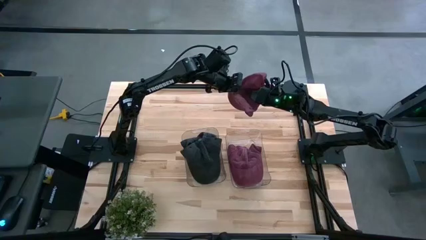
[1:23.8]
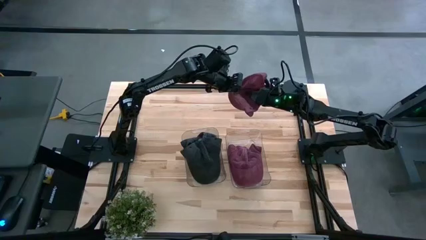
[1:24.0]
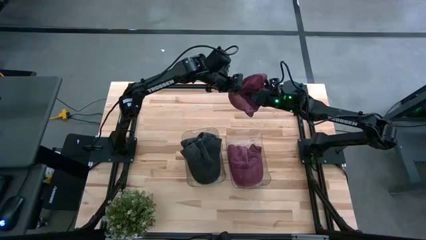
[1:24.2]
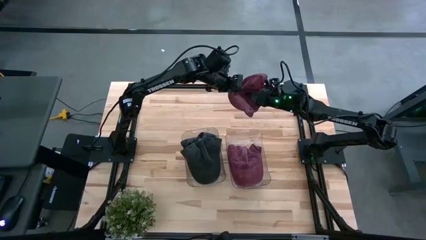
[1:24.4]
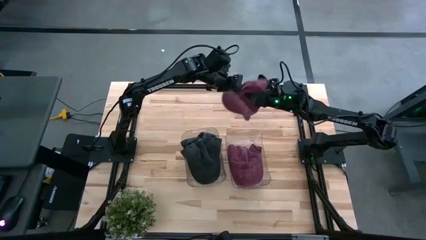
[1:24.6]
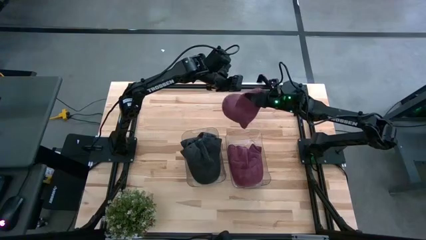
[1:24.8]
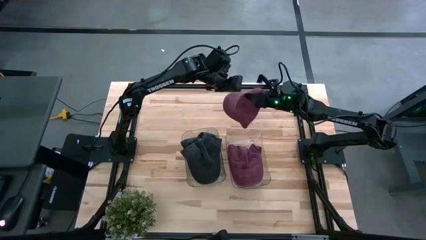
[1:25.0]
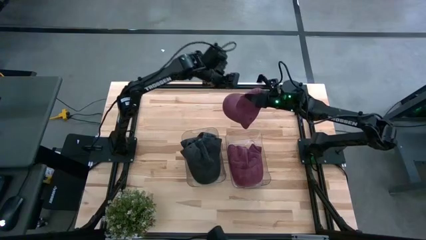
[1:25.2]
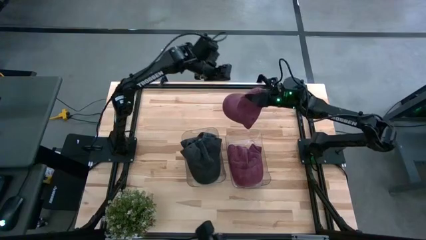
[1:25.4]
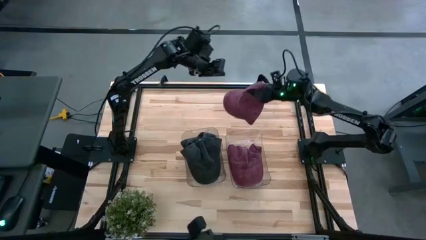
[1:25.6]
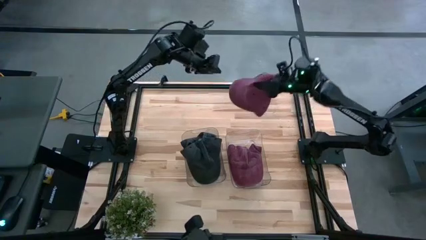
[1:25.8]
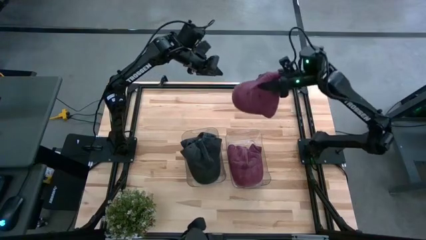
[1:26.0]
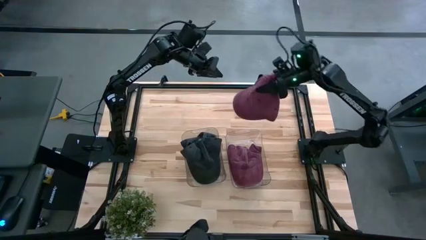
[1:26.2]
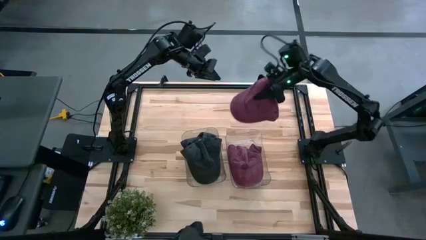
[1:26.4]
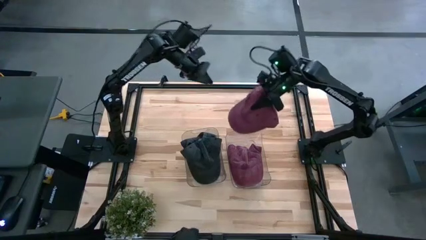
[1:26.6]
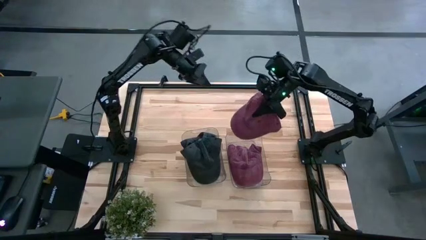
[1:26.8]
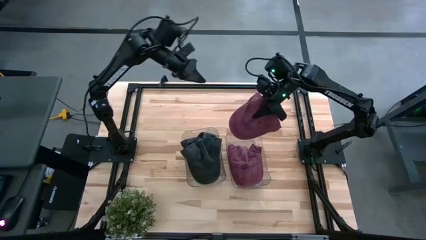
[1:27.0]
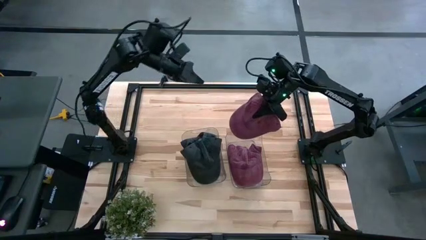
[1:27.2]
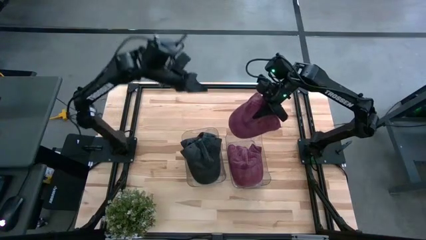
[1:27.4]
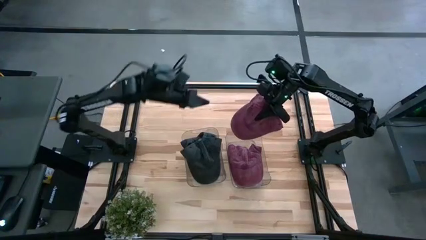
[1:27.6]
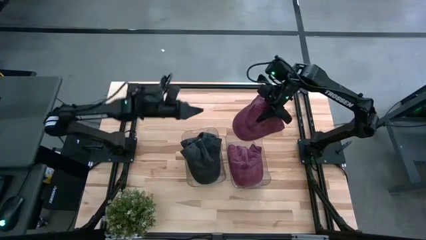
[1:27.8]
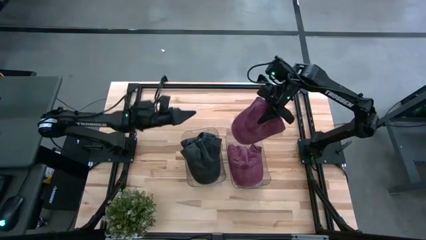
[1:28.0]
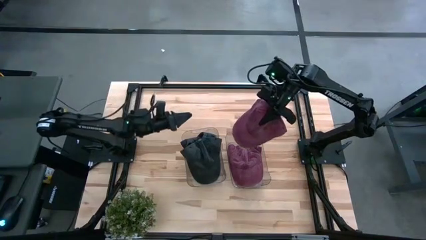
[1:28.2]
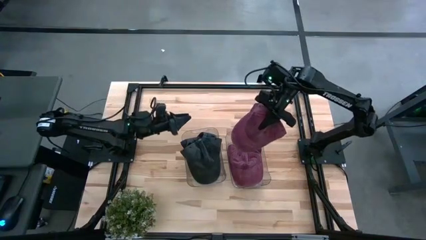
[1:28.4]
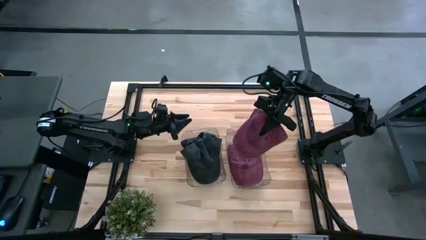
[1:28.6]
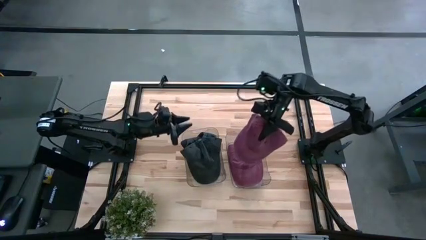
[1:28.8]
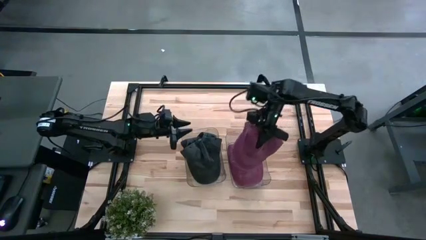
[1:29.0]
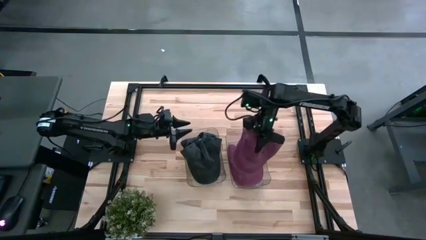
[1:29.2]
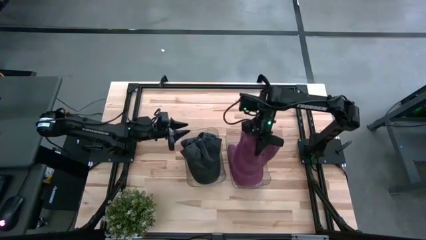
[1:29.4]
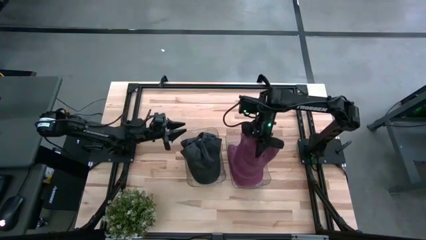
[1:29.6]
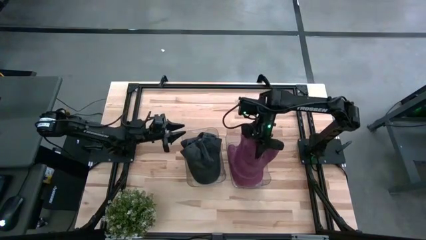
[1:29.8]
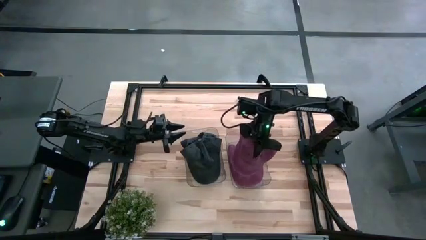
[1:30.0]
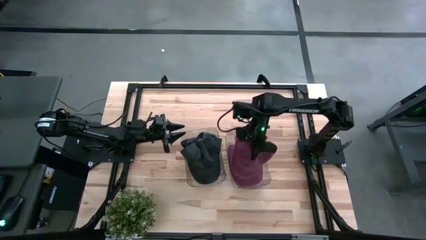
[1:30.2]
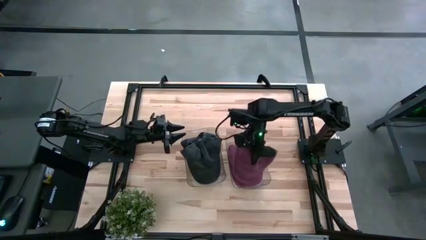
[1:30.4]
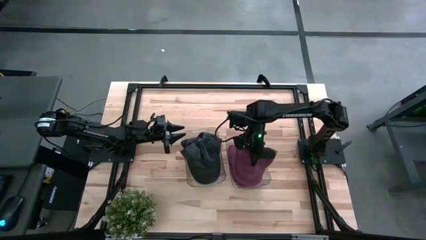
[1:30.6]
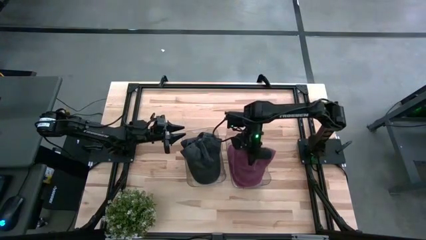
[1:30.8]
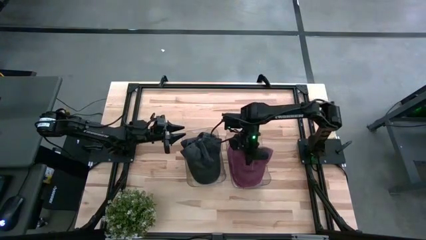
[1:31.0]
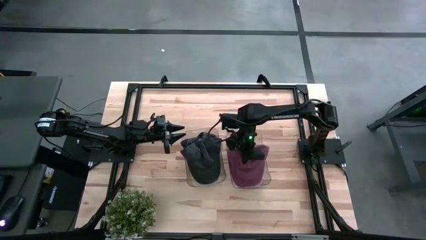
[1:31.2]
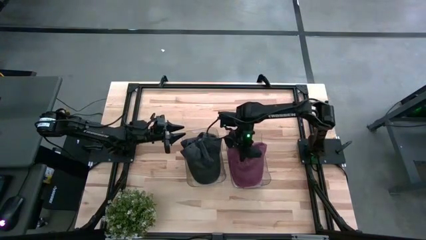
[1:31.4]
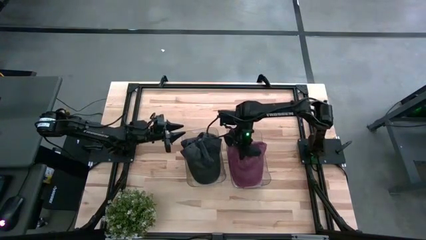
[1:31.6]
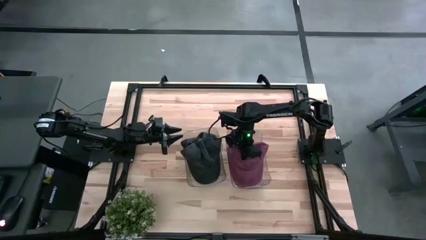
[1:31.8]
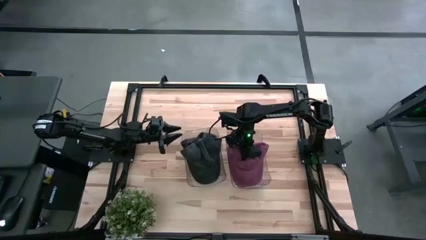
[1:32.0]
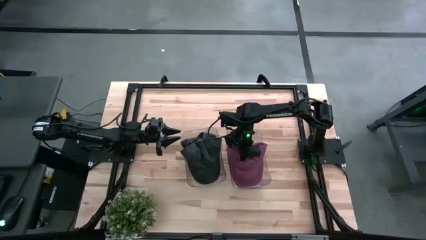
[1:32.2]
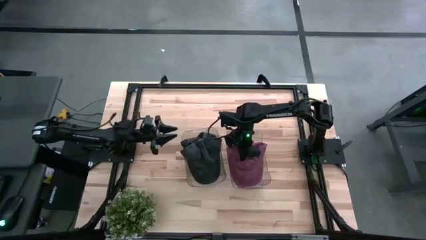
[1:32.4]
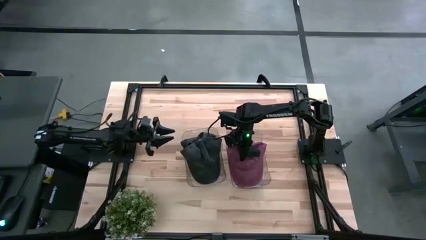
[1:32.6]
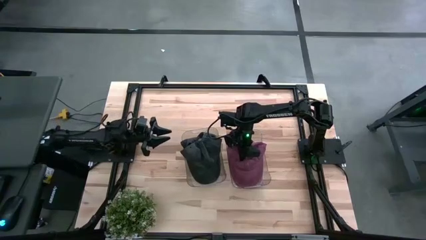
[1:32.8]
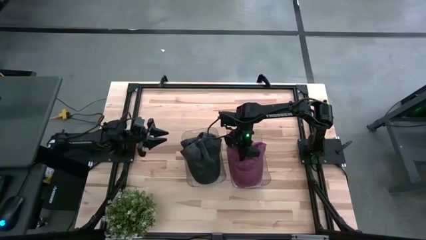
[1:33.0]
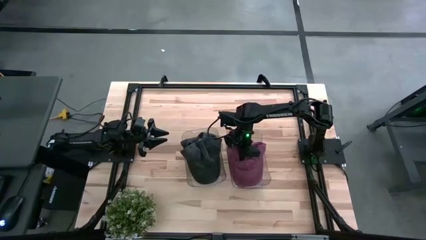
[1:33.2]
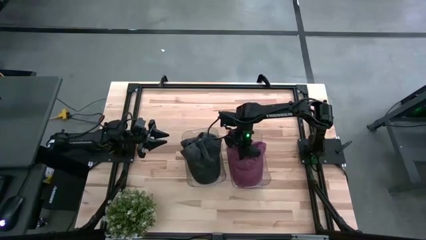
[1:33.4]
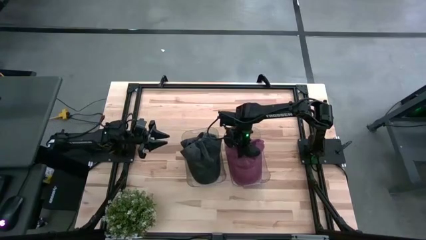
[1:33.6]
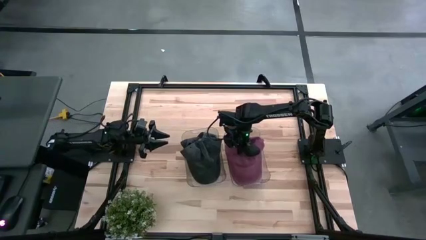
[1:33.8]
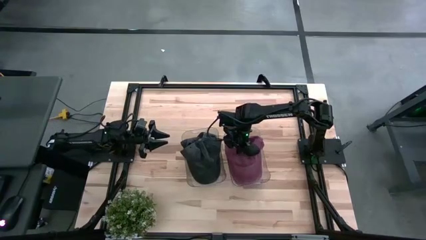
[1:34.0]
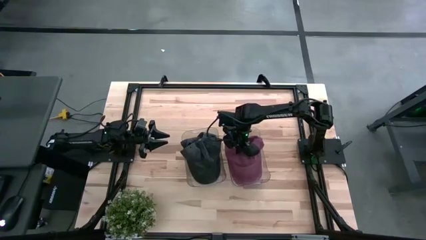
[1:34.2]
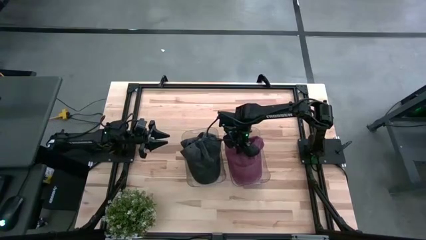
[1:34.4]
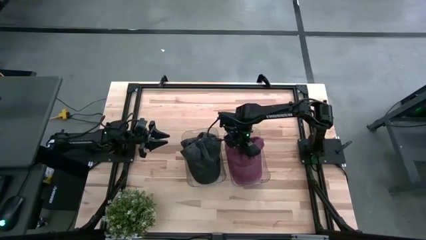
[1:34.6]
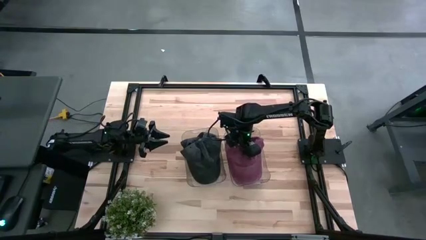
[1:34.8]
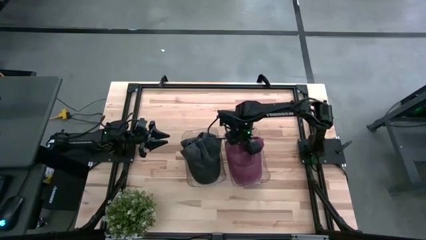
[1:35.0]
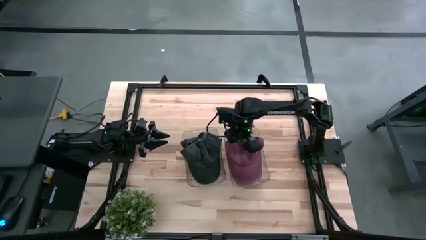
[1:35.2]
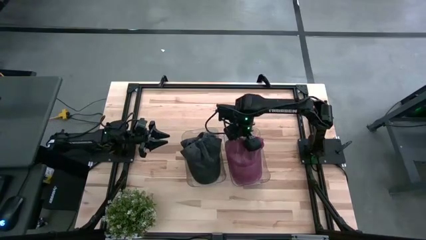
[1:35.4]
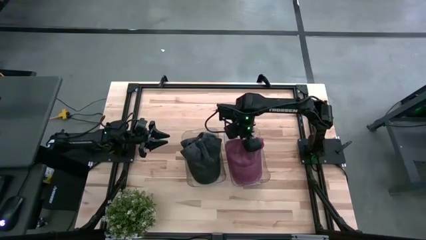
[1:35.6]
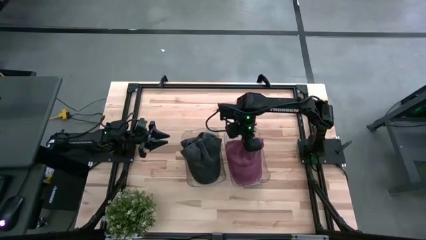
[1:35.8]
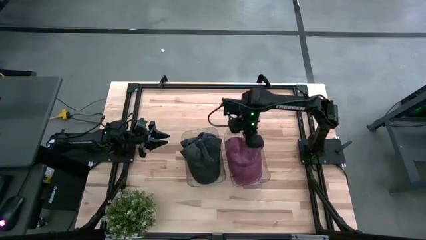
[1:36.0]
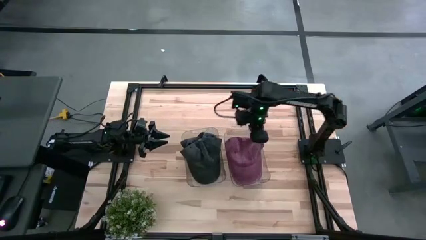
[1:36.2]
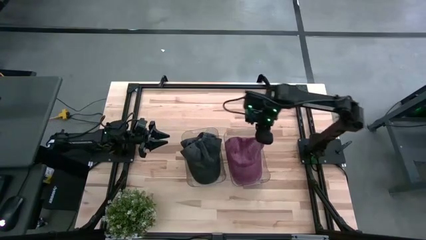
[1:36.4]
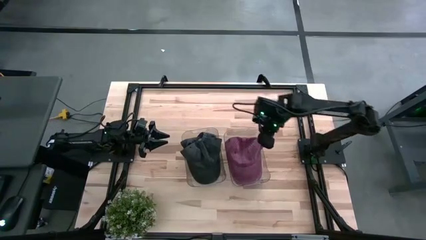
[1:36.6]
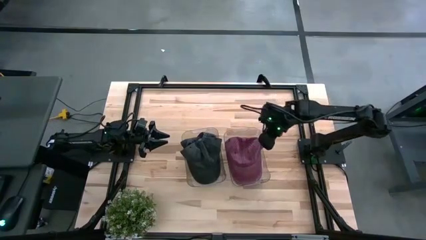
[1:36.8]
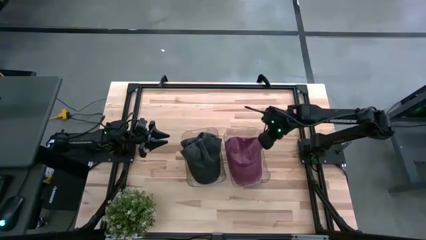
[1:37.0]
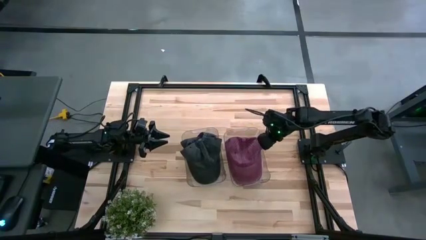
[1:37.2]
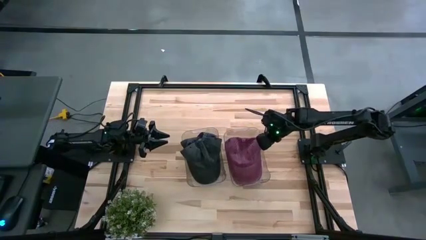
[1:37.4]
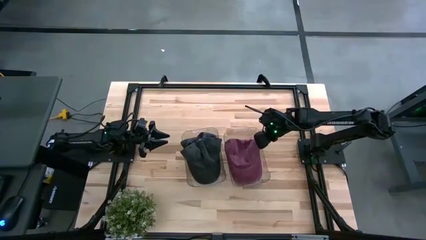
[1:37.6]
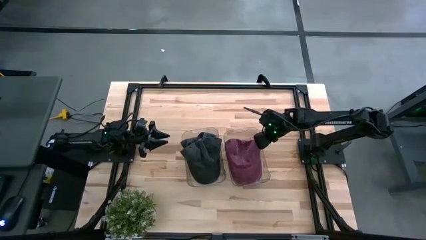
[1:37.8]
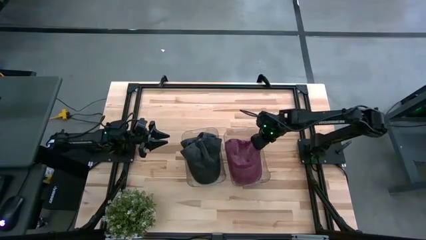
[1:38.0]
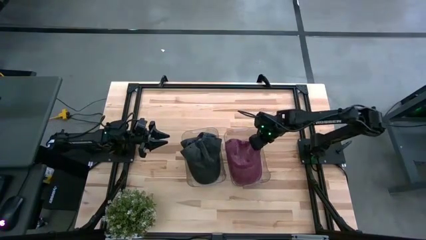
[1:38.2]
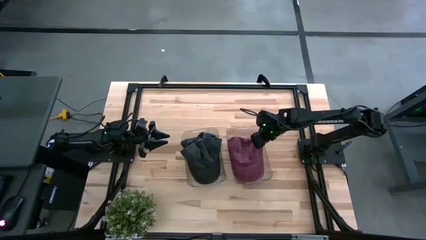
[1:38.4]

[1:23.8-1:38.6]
Task: Pick & Place hat
Put the red cap into the right transparent bin
